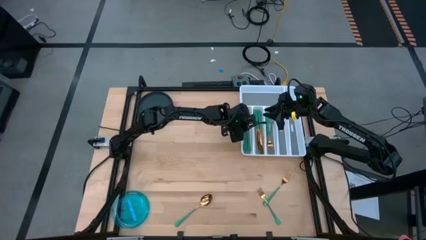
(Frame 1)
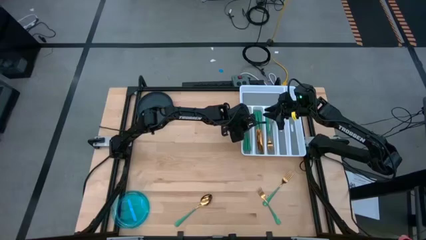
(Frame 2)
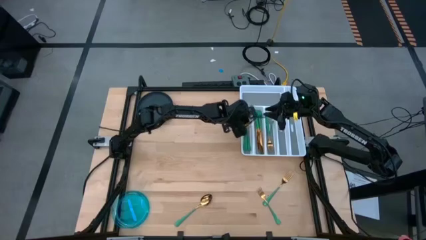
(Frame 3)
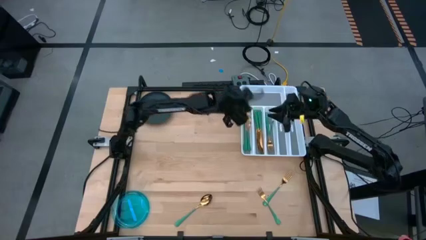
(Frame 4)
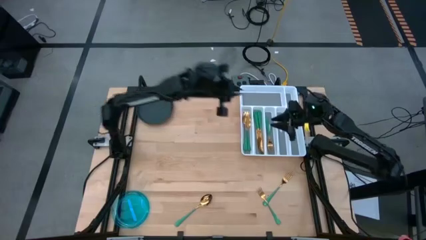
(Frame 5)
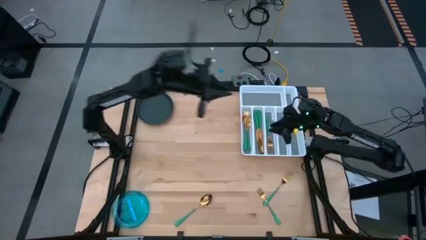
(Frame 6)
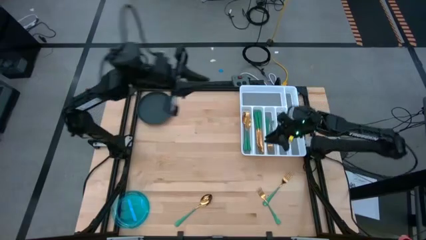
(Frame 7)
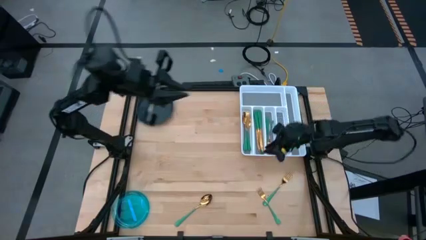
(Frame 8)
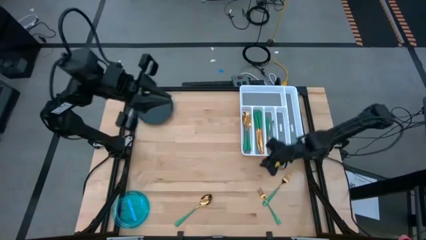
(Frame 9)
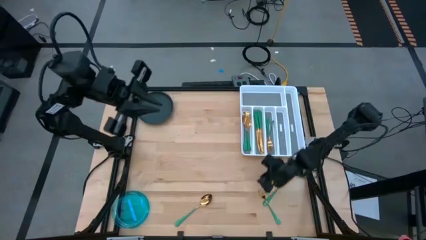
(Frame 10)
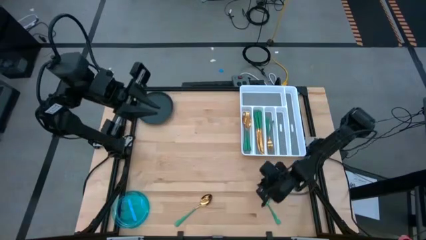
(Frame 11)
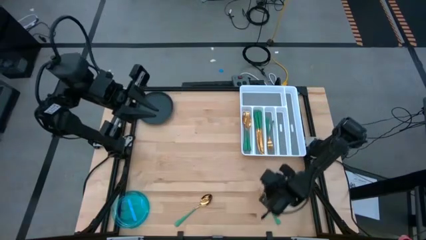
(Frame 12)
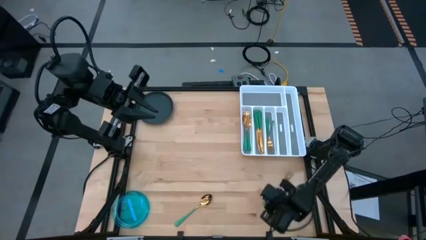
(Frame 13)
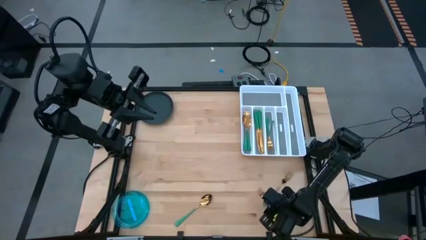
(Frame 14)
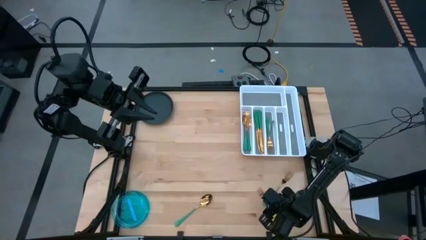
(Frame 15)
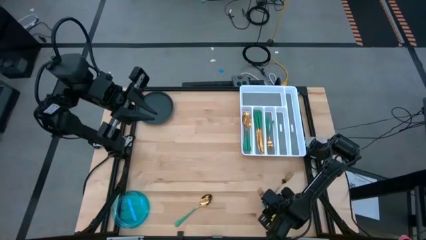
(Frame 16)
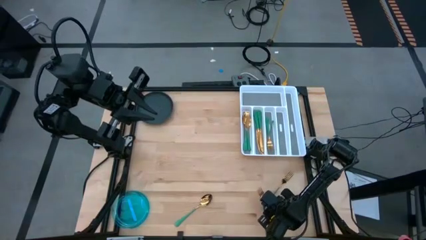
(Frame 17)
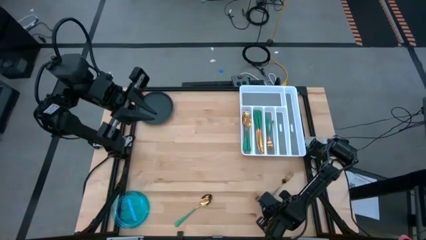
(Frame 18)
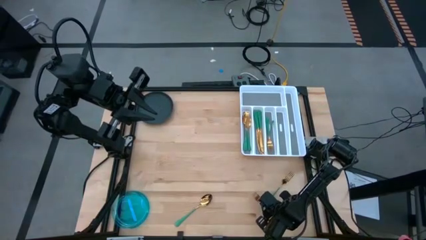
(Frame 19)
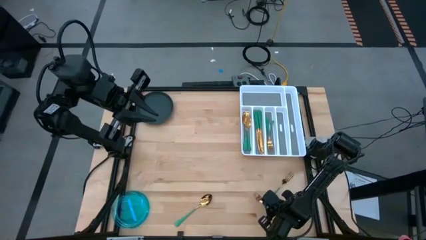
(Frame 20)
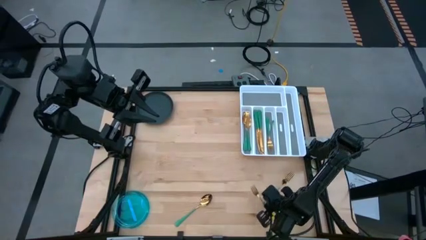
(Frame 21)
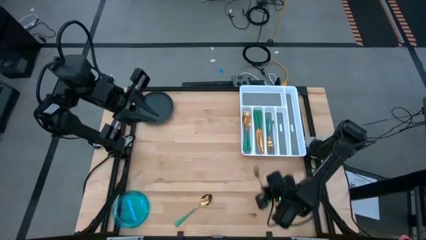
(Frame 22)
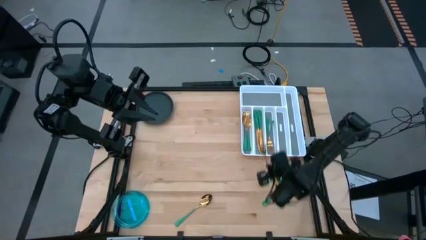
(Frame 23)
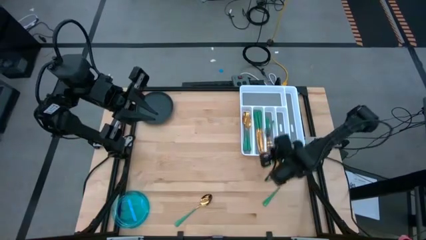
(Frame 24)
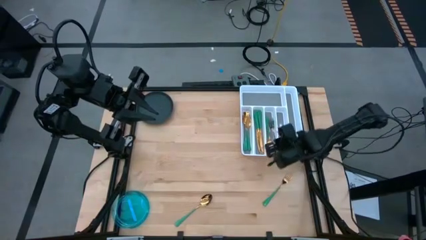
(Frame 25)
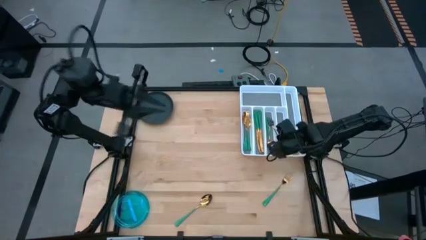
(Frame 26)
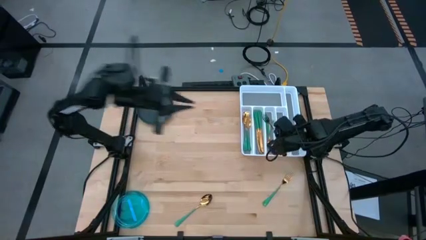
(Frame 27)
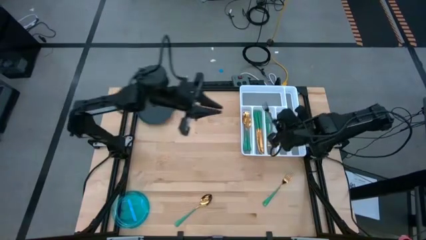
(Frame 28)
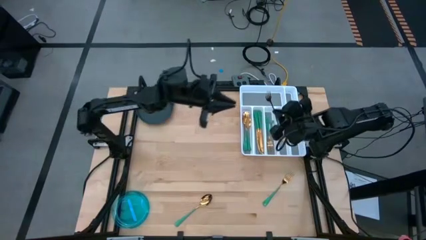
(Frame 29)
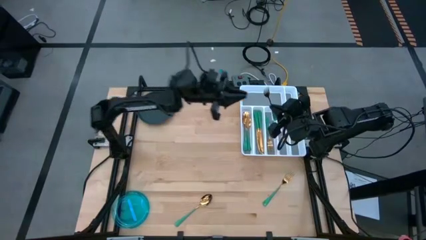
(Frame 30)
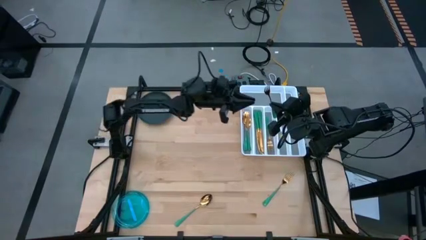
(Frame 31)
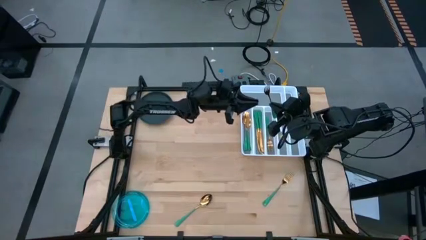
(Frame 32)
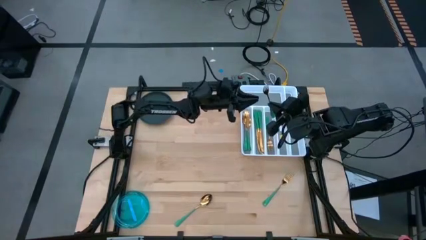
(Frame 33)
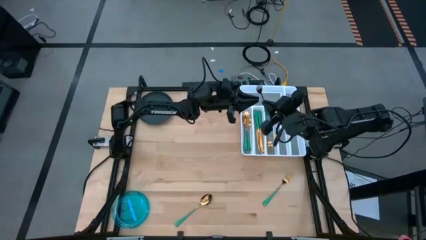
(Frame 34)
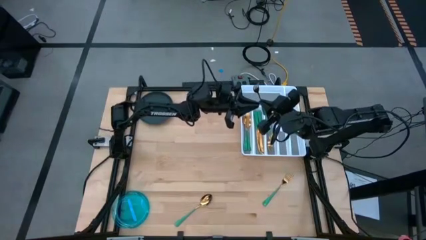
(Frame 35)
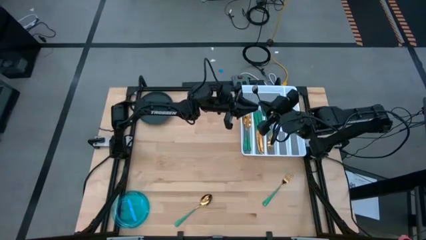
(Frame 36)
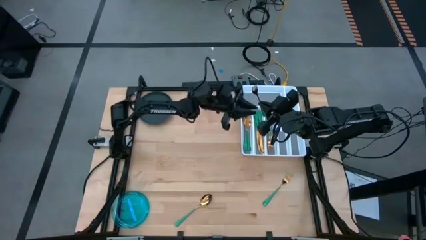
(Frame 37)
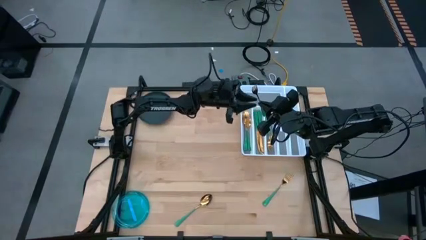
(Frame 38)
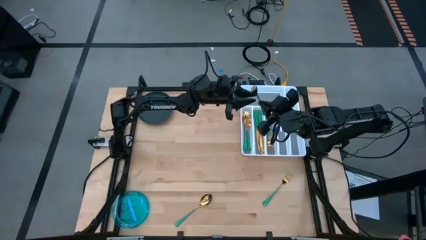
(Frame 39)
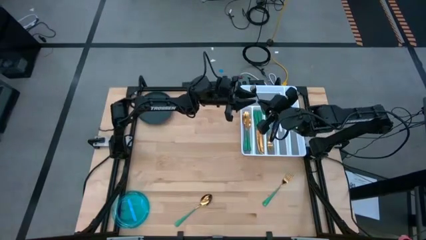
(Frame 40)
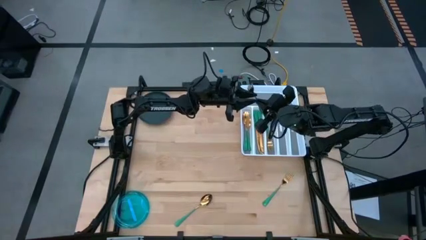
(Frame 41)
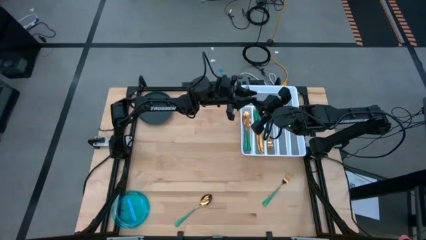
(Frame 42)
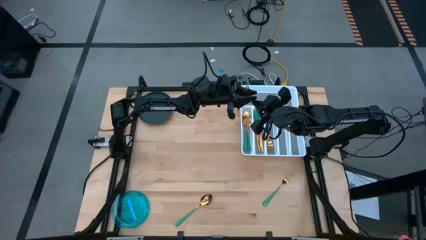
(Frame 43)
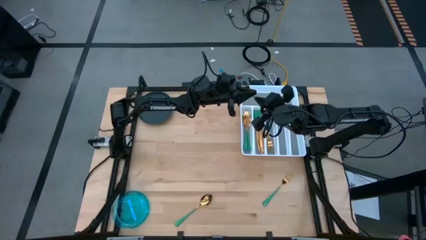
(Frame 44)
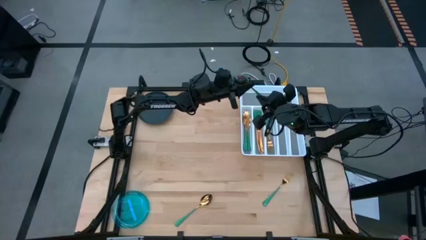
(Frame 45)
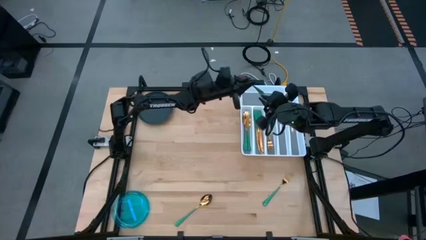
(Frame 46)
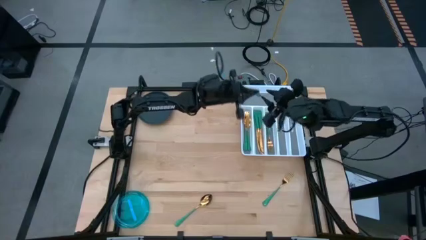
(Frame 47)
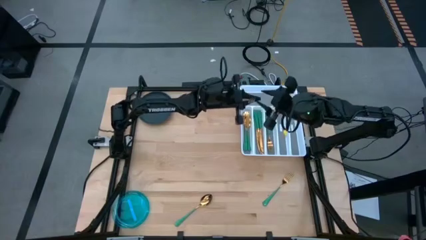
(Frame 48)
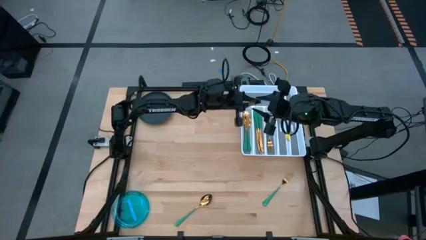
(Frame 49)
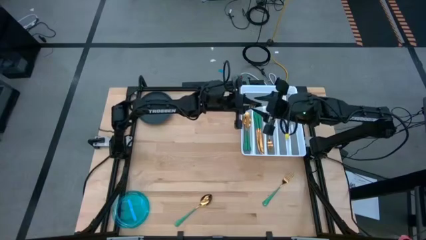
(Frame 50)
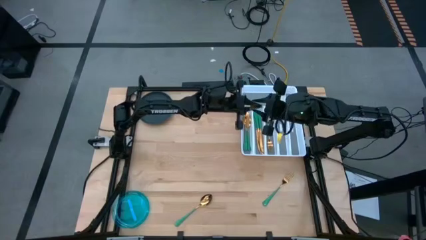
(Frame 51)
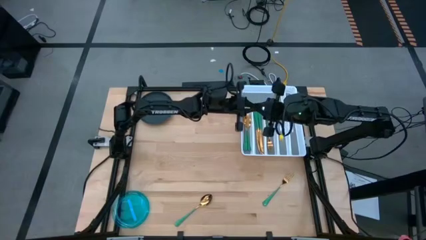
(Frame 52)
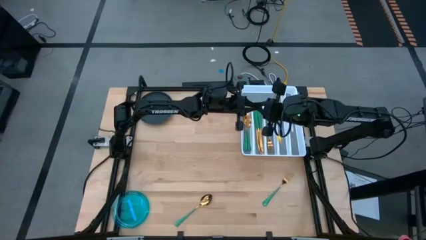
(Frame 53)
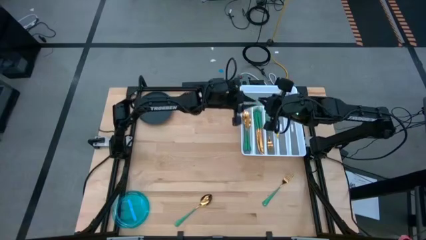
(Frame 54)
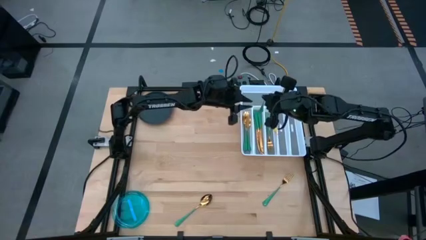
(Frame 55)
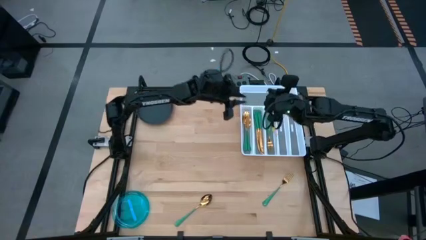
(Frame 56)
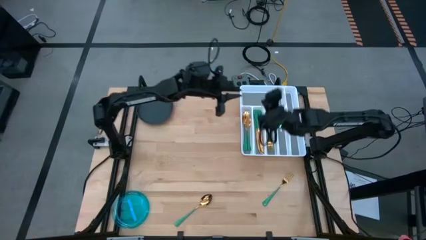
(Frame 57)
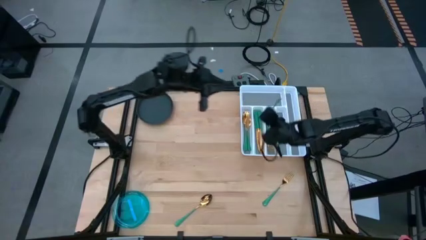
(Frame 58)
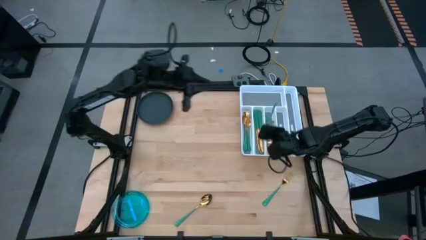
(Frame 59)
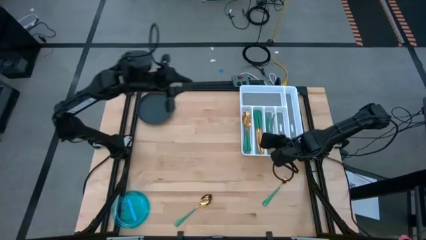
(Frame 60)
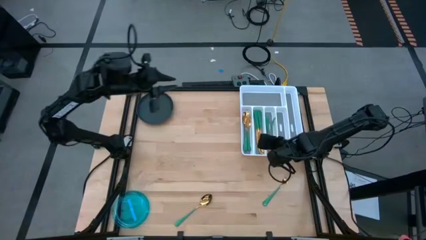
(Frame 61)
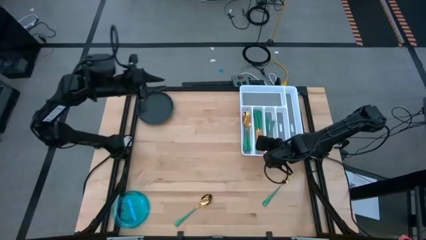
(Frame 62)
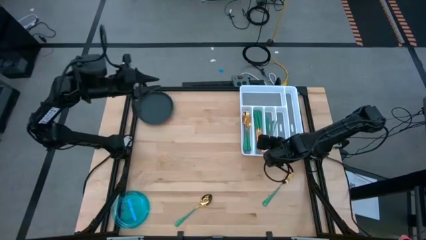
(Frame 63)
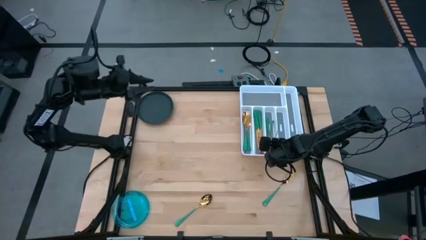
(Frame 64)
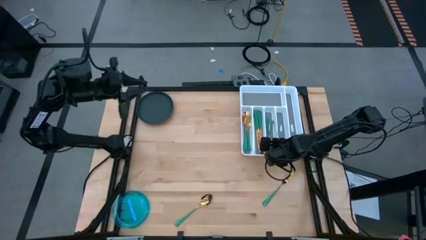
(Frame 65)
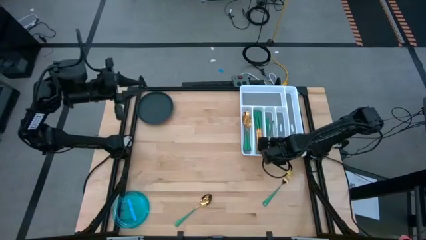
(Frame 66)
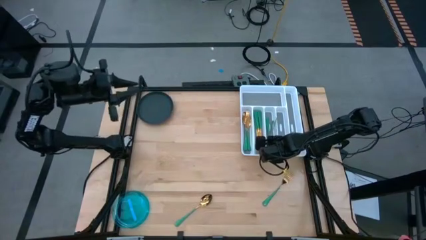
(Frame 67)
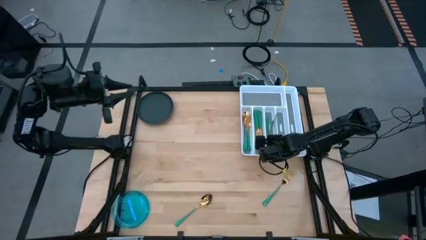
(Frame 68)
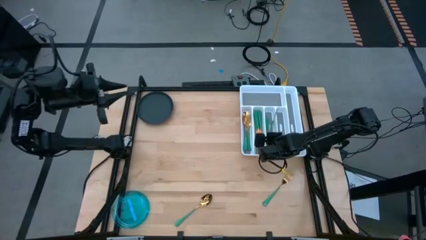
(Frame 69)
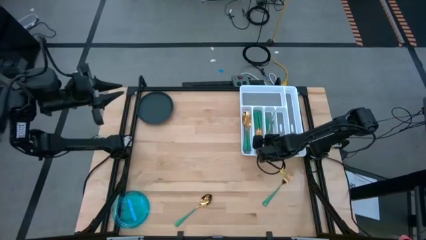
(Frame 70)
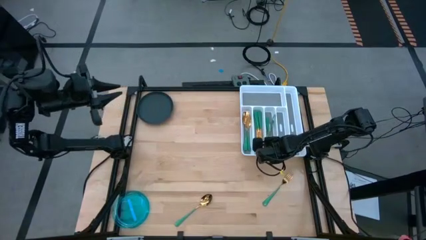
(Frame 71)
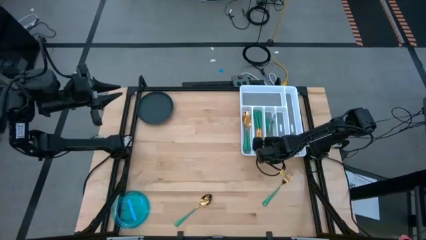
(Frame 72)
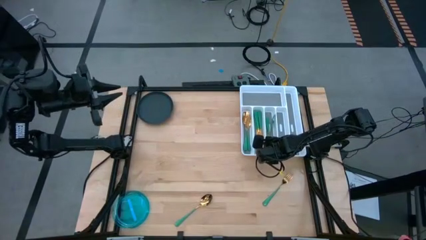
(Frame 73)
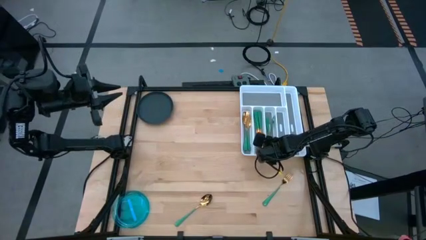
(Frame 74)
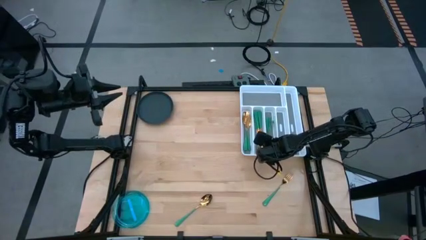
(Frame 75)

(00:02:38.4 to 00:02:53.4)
Task: Sort silverware
Put the green fork into the silverware tray
